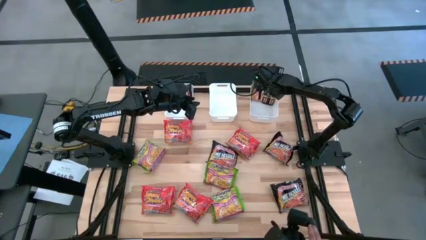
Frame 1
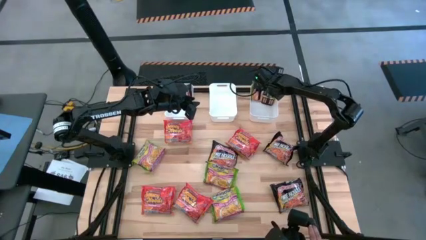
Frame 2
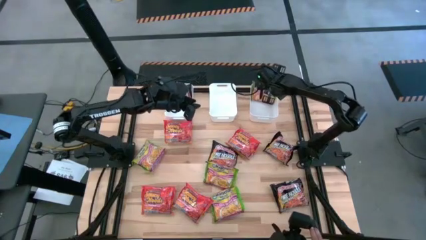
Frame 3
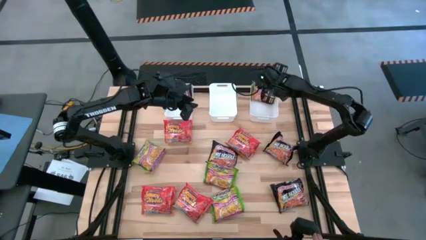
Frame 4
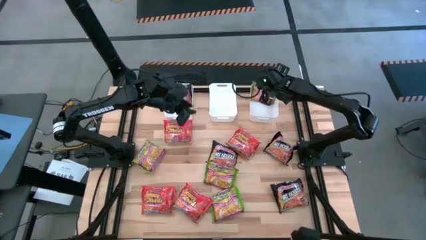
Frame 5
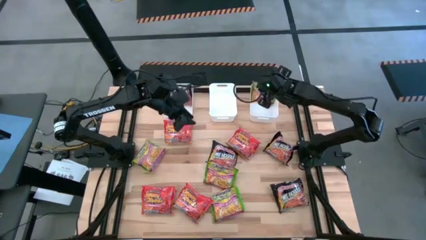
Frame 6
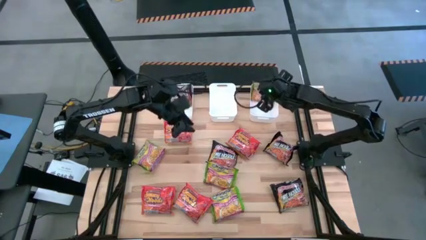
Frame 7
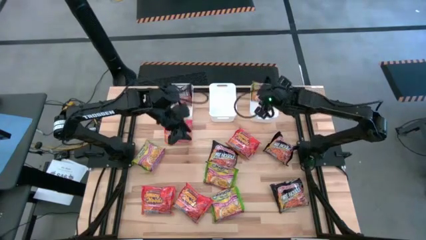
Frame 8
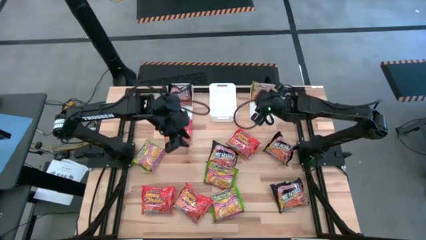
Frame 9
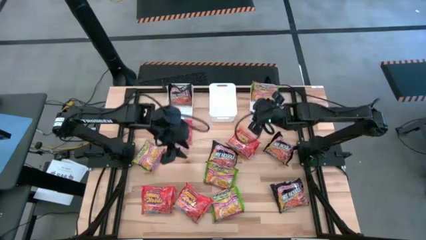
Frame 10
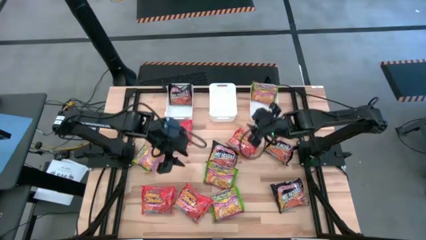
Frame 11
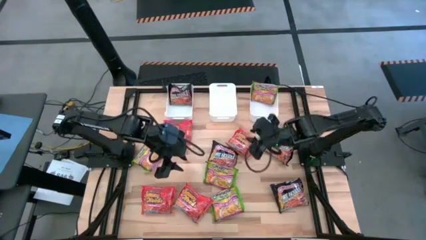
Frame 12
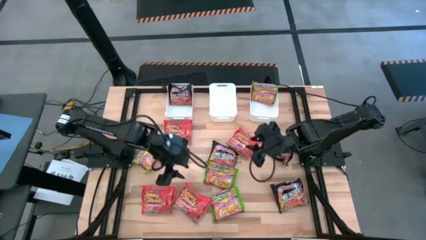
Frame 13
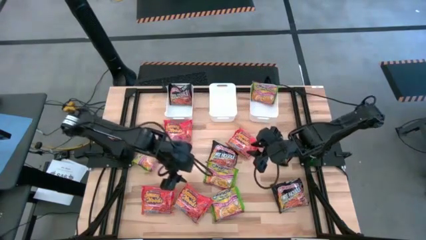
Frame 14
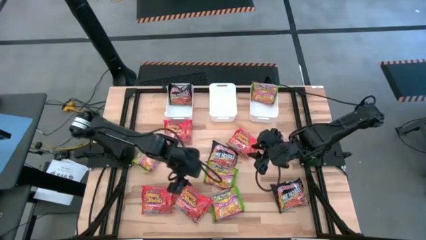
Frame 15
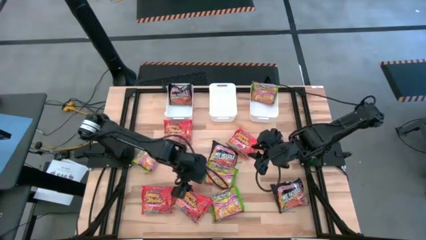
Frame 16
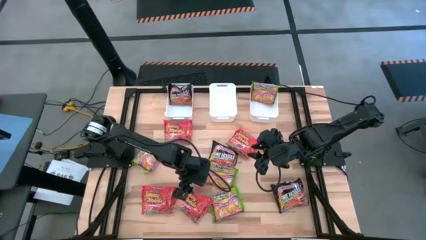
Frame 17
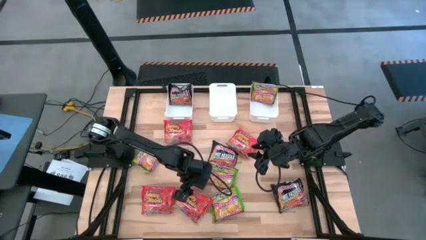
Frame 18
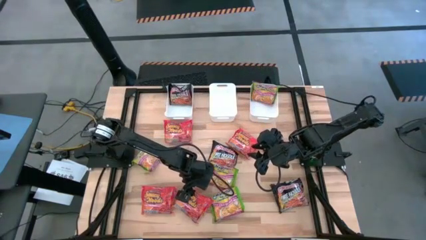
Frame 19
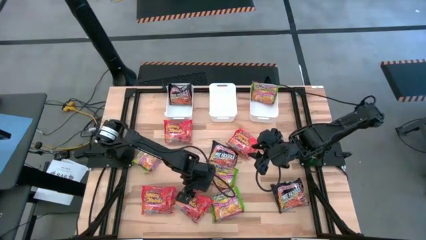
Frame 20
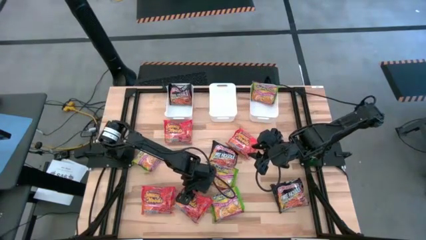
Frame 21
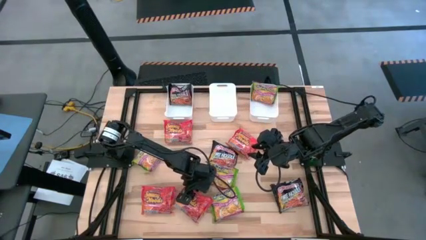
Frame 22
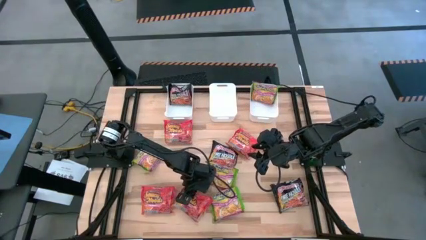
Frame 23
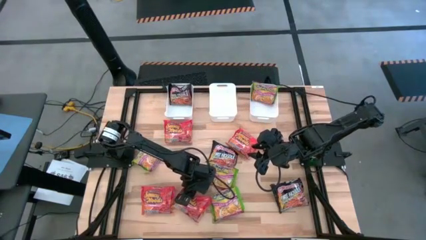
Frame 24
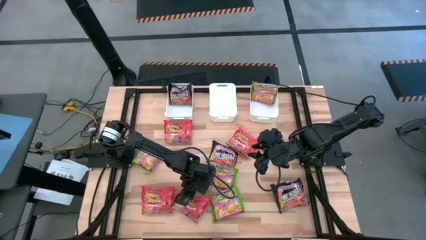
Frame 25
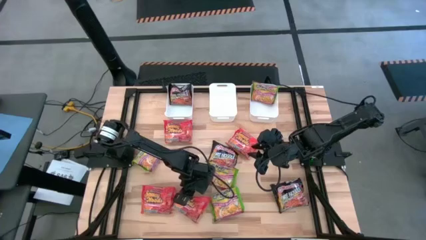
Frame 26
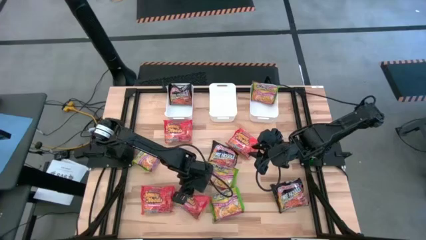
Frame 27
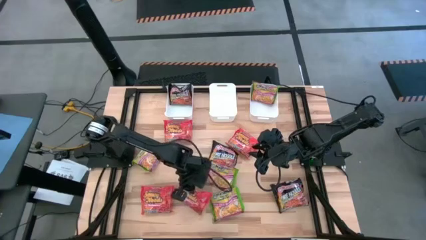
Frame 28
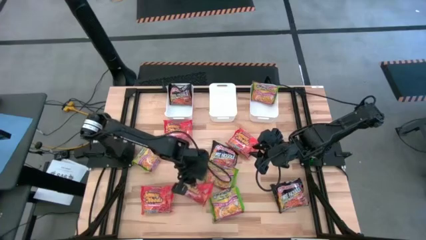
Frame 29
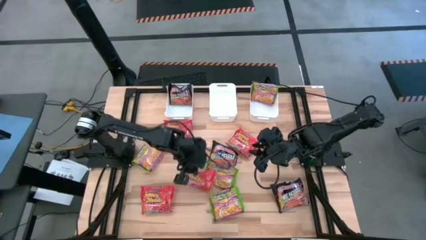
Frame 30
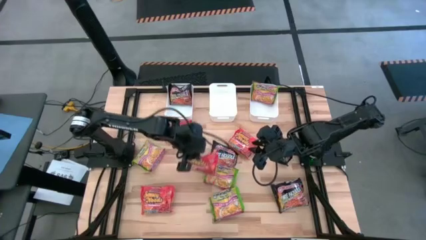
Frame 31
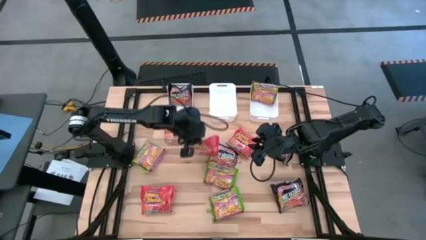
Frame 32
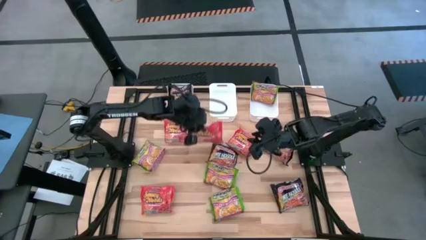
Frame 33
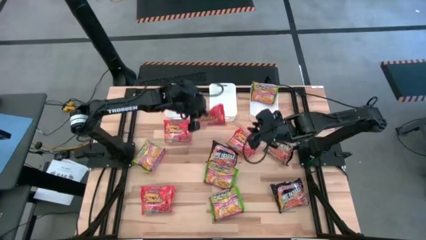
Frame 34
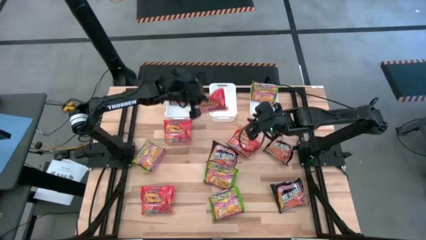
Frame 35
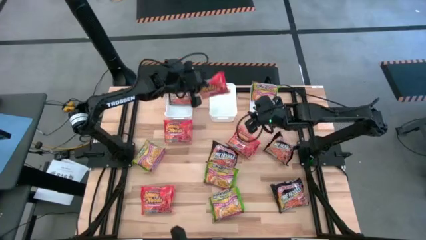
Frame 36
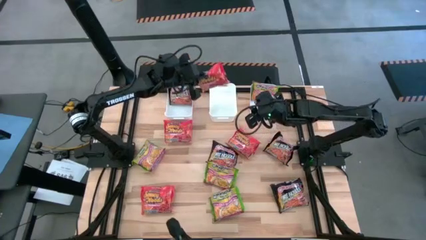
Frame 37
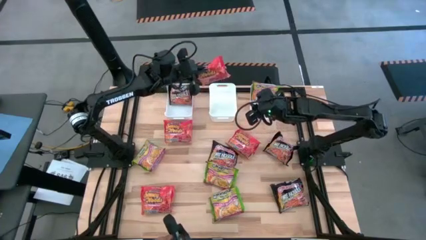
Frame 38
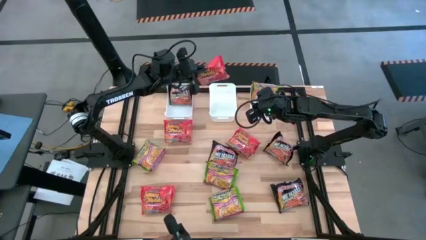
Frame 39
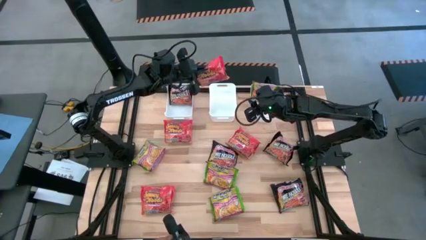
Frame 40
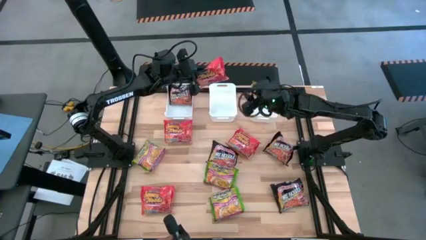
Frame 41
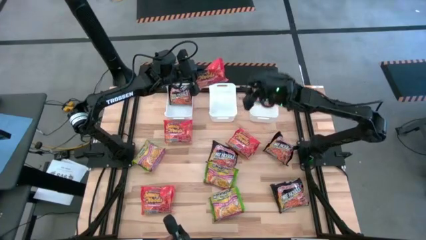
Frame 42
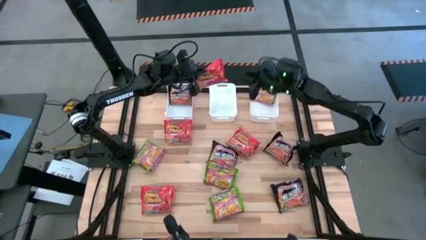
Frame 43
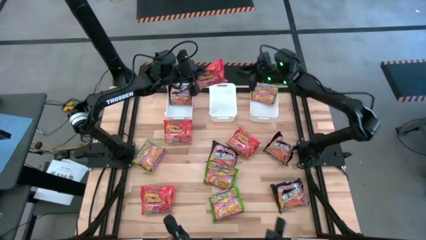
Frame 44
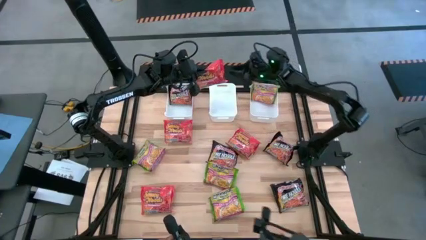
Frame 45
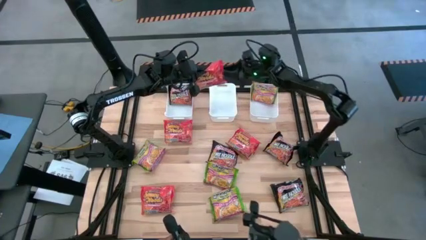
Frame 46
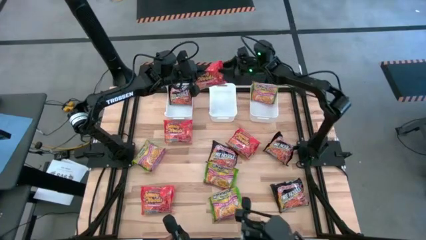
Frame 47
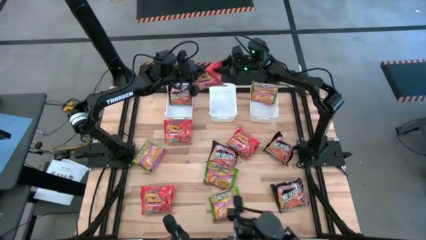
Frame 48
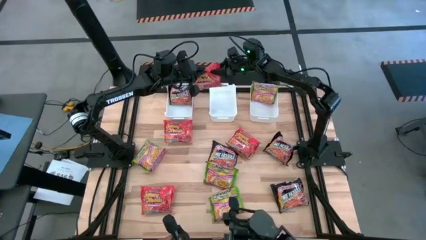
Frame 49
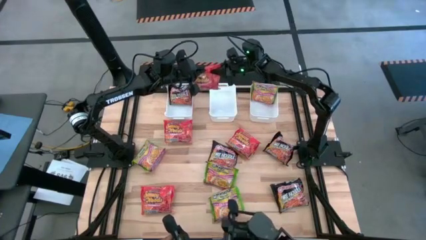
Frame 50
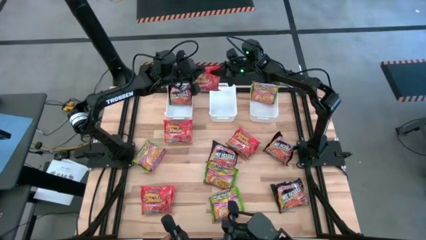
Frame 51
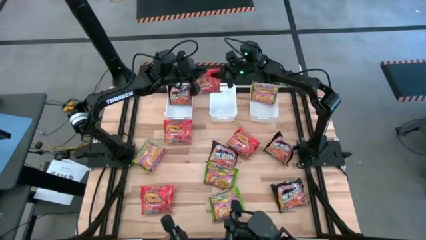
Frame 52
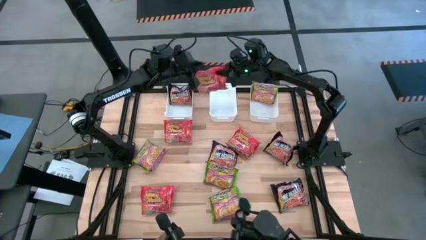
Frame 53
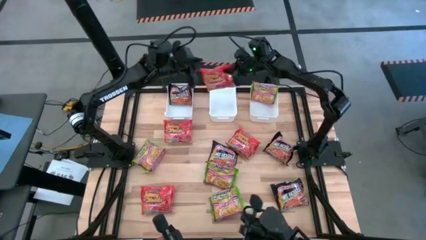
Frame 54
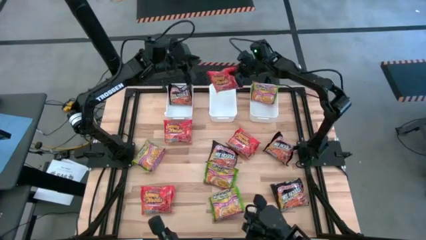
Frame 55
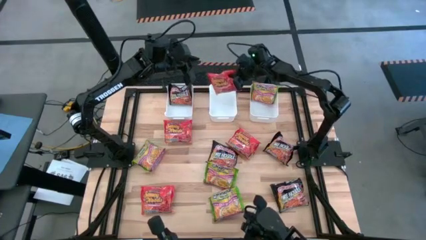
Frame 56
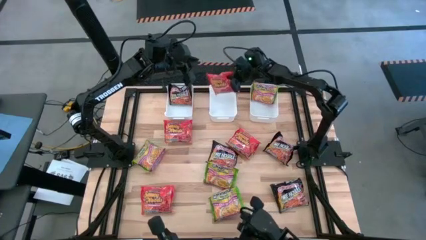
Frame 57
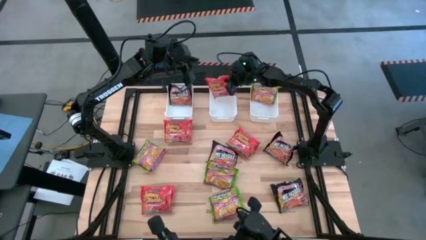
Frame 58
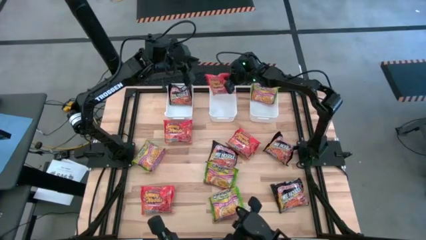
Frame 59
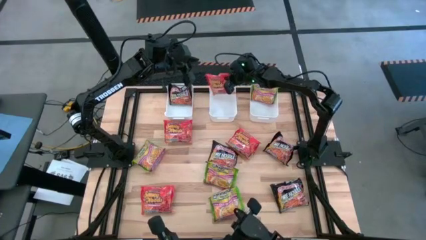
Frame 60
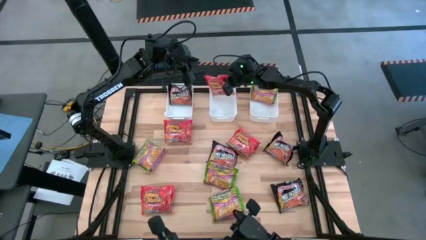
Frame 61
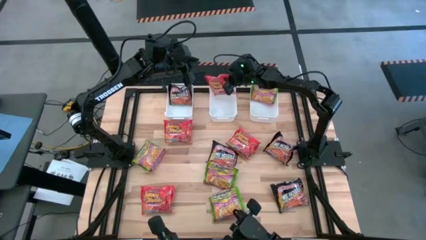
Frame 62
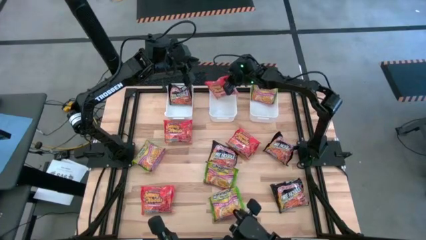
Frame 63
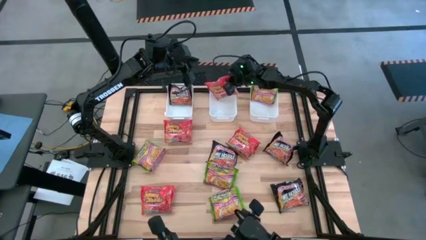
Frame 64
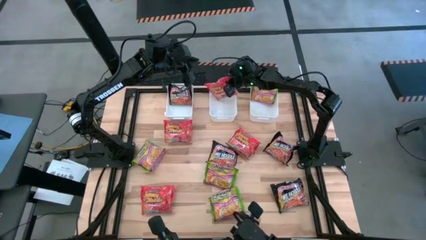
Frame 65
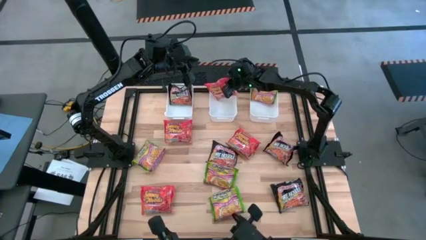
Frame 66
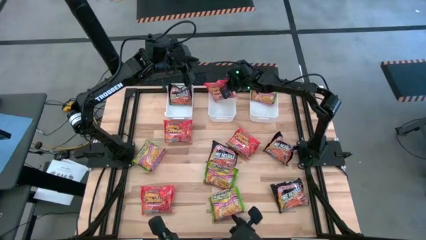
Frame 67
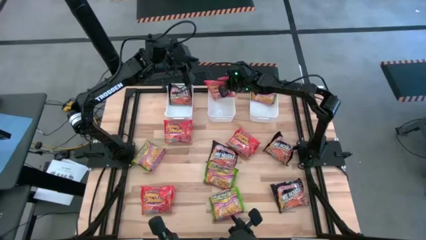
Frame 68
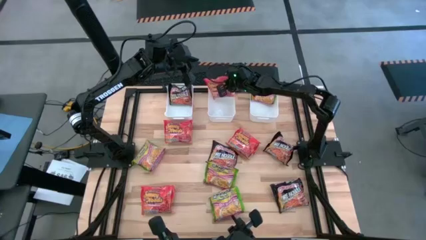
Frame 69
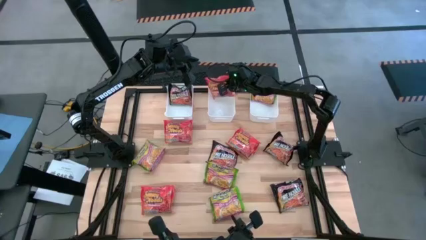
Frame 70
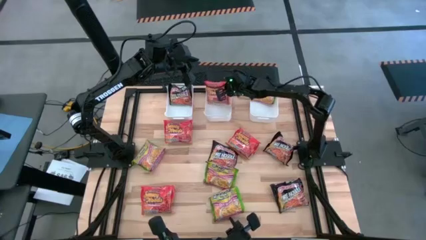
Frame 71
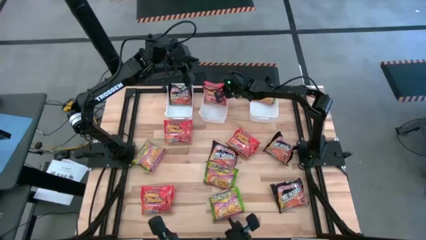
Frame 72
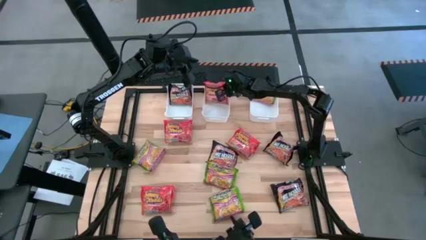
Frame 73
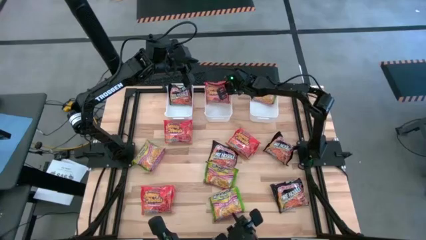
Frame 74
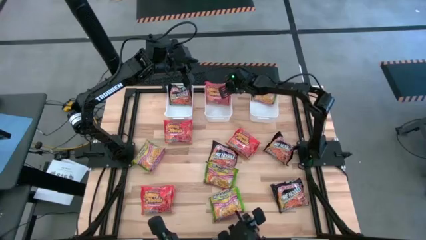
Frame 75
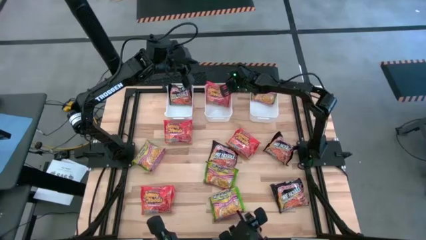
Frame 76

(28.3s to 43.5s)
Task: Sort Maruchan noodles
Put the orange noodle pack into the middle white bin
